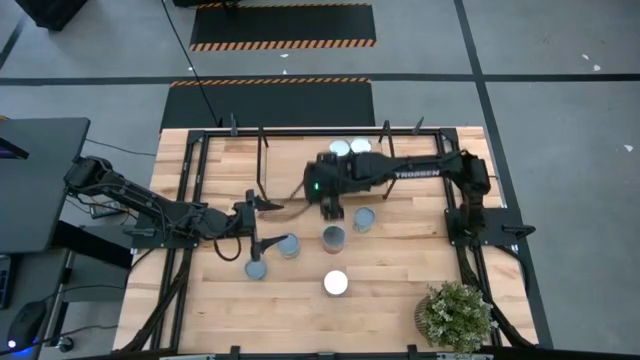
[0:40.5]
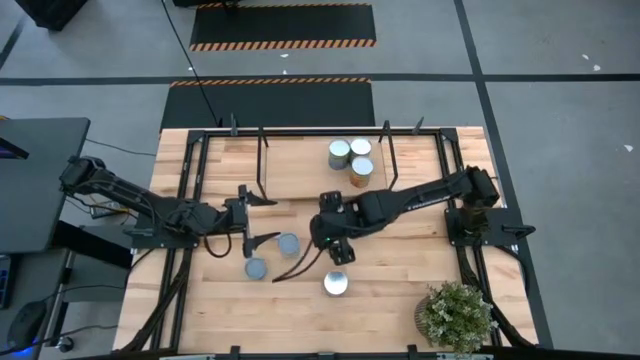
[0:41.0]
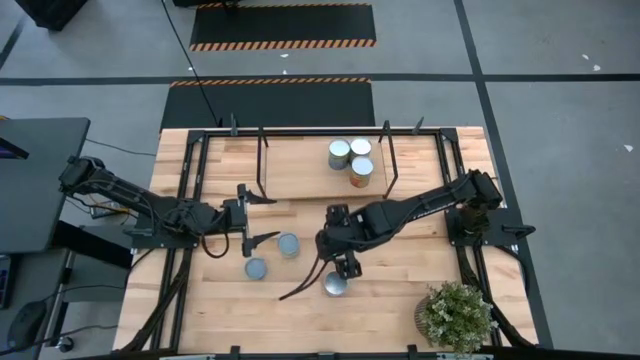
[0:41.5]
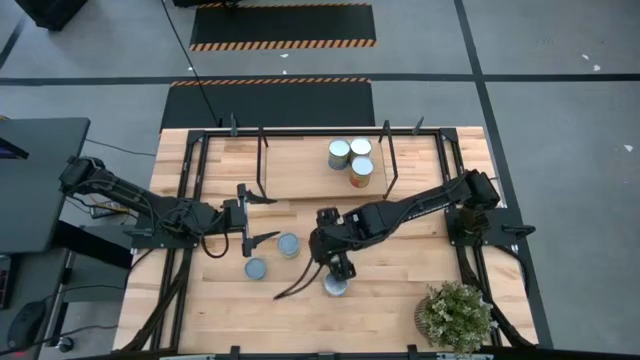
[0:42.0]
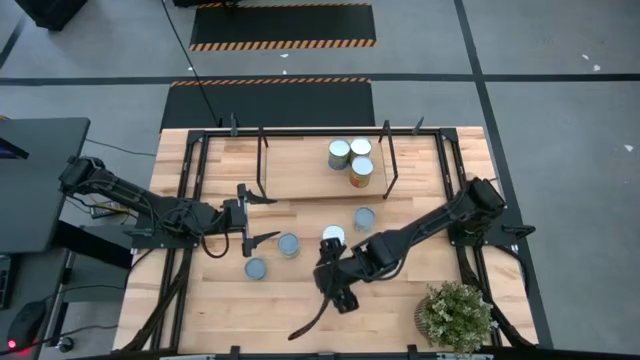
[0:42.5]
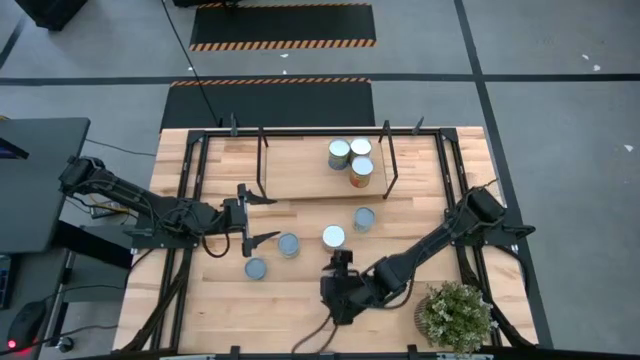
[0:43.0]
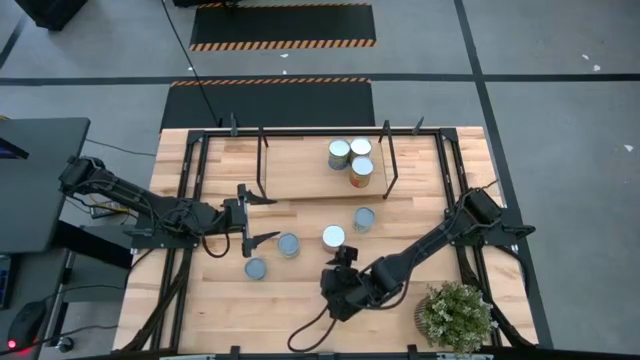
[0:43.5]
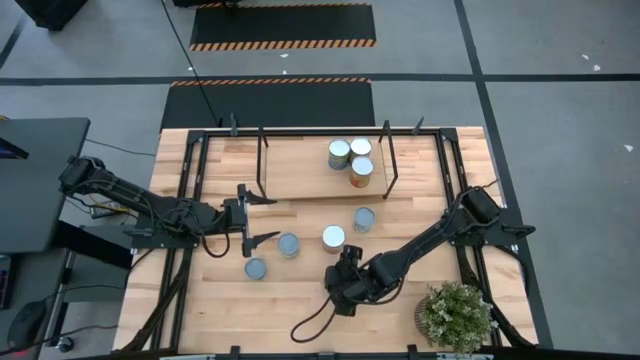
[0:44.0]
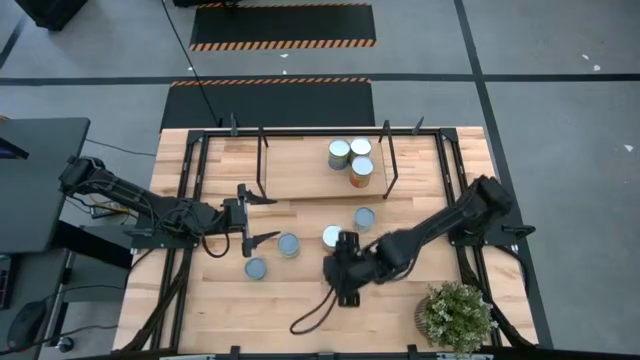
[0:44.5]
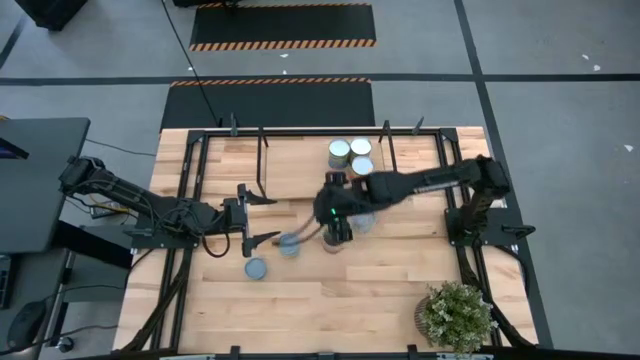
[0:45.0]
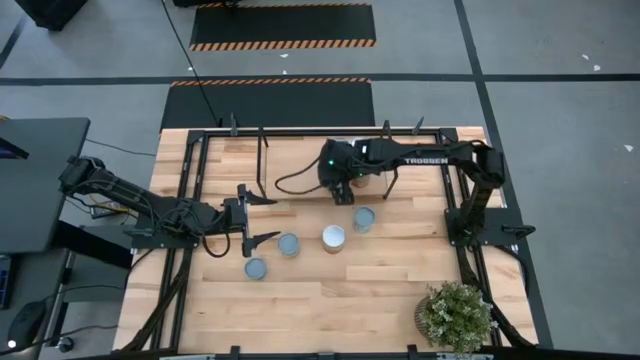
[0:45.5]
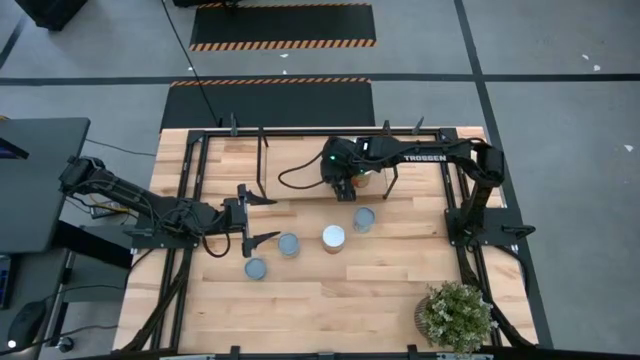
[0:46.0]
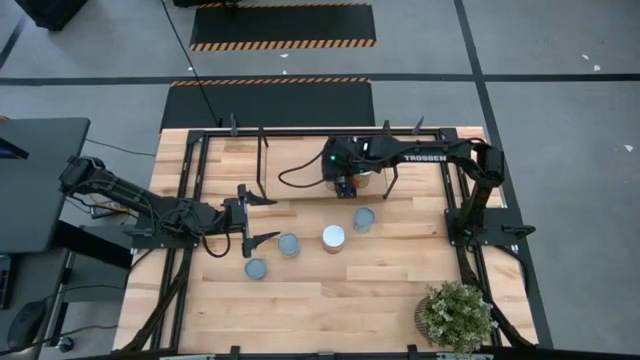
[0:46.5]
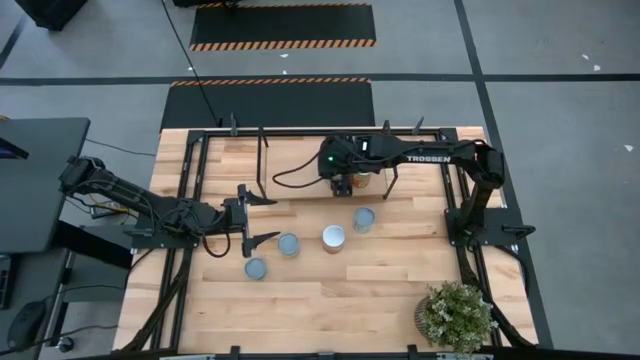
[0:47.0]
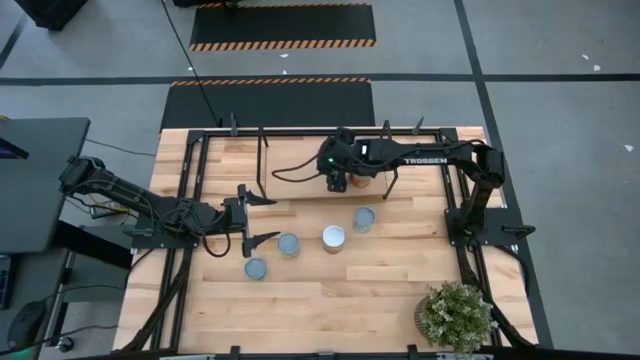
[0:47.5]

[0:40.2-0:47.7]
Task: Pick and place cans onto a shelf
Put the canned peaches on the shelf

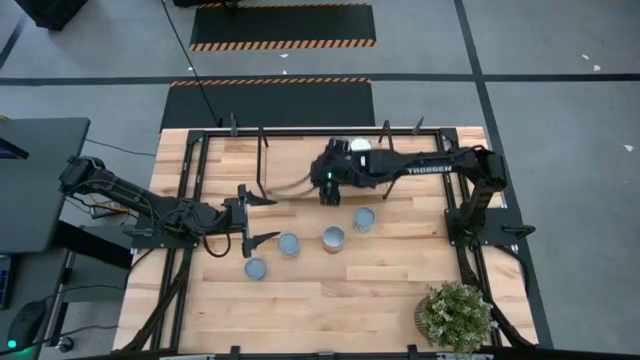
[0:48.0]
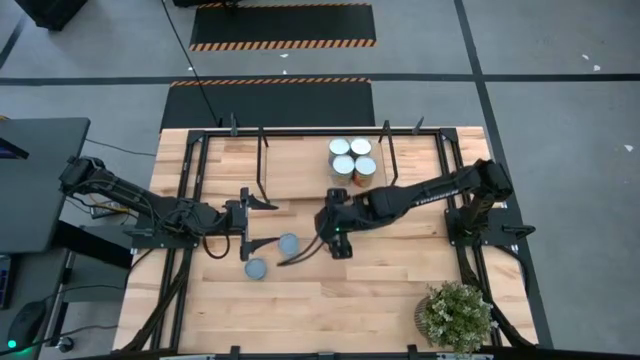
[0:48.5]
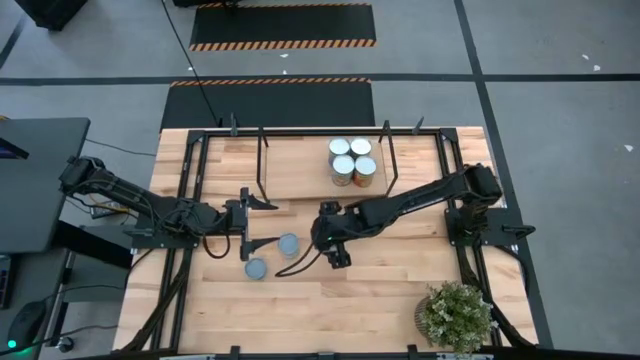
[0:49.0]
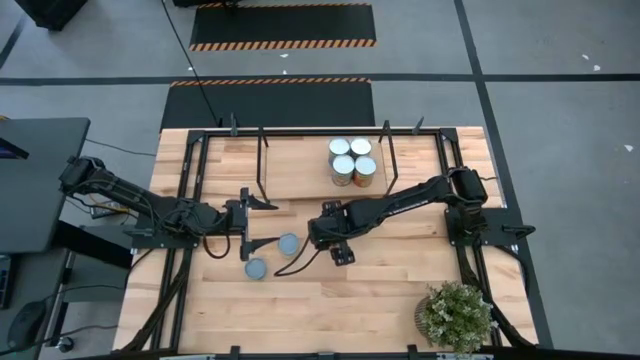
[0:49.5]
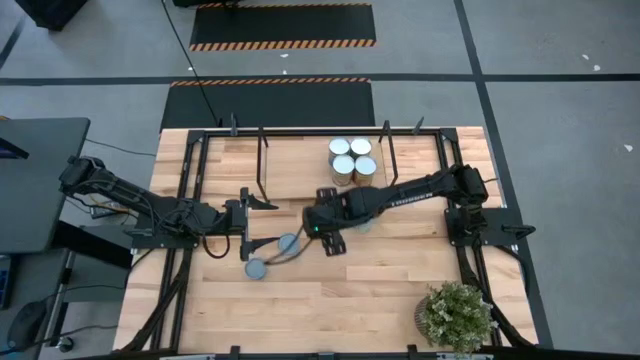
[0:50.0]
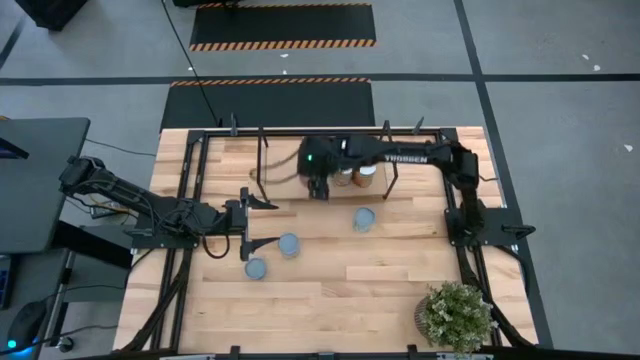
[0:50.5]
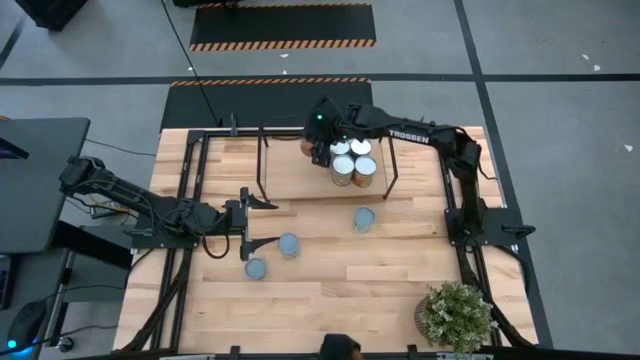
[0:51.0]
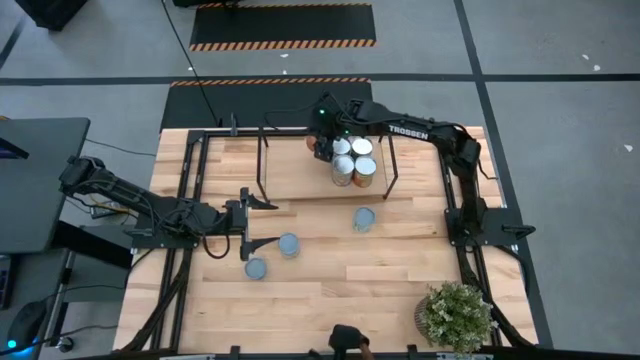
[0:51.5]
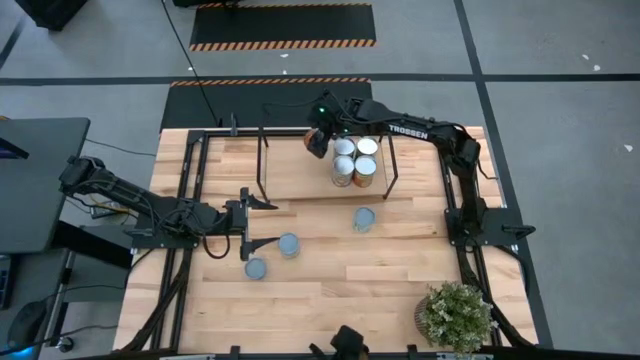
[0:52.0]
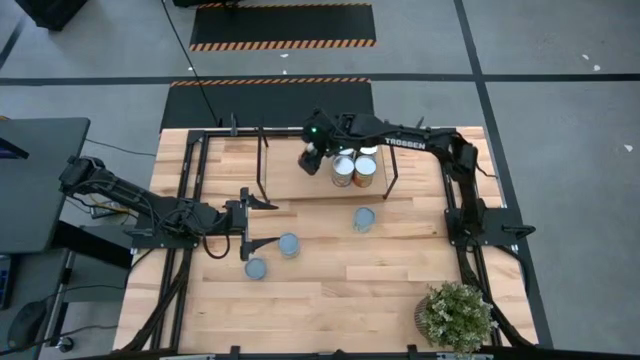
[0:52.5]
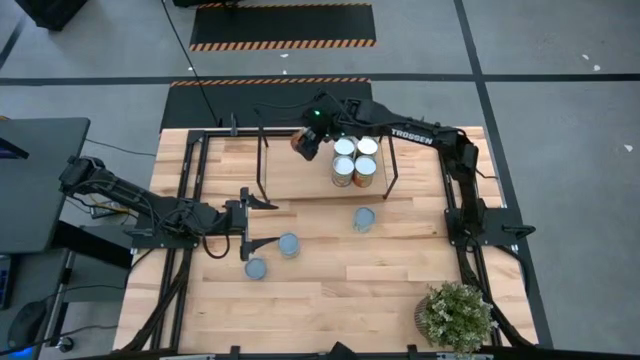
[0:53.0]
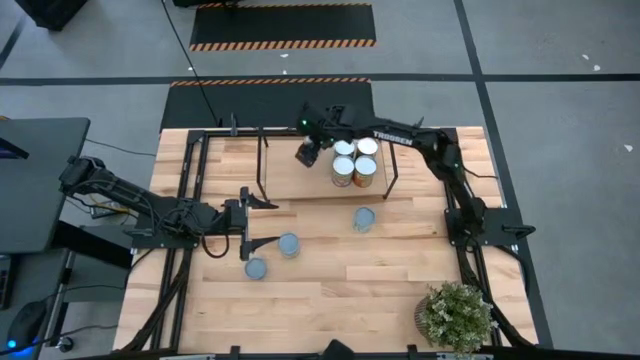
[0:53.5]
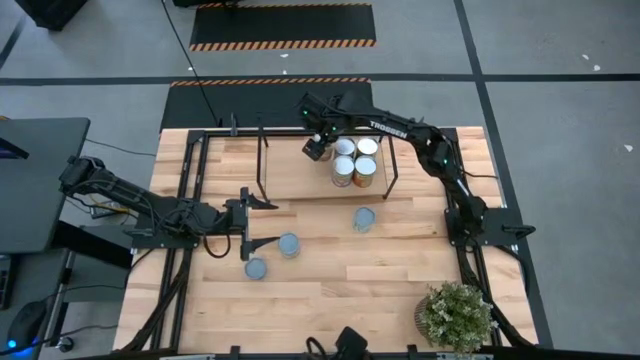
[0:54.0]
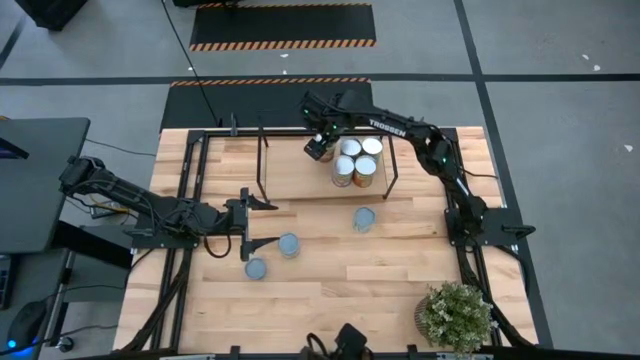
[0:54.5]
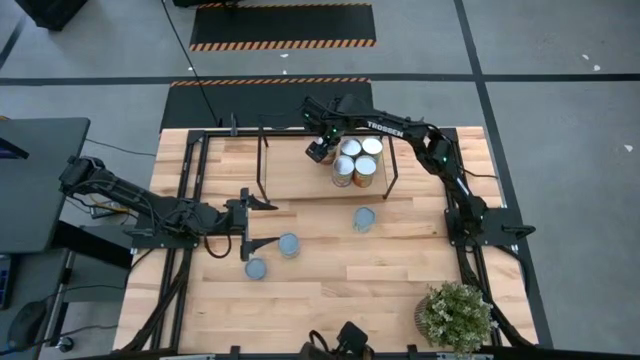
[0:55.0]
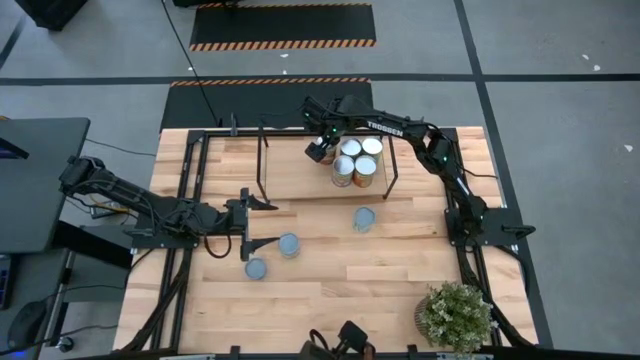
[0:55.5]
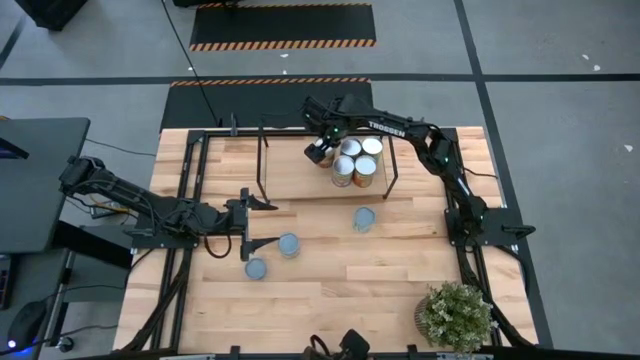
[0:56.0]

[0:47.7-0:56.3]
Put the canned corn on the shelf

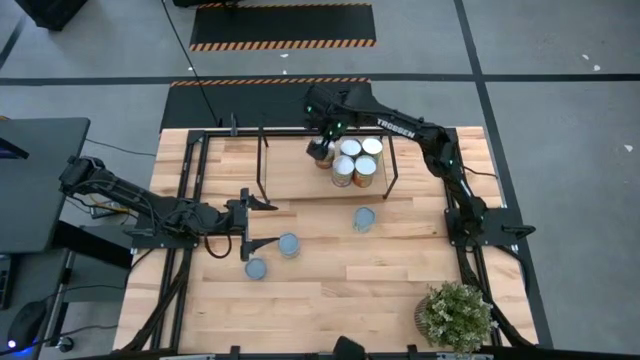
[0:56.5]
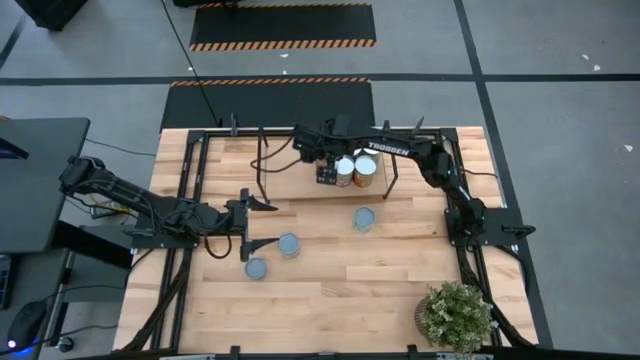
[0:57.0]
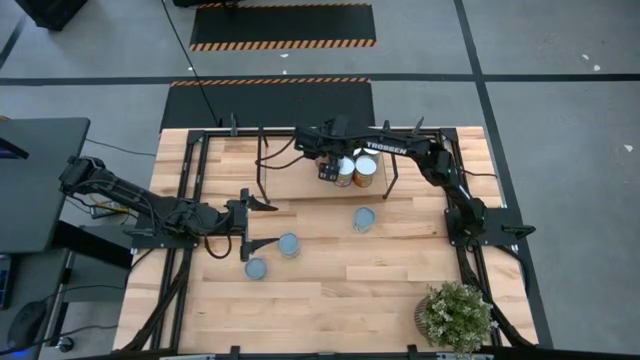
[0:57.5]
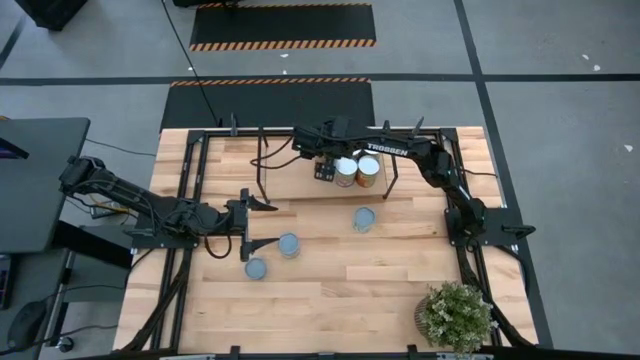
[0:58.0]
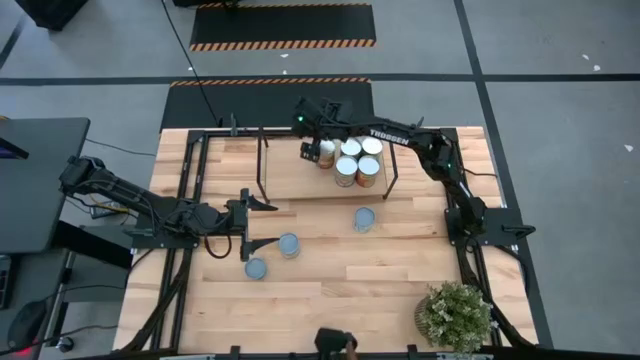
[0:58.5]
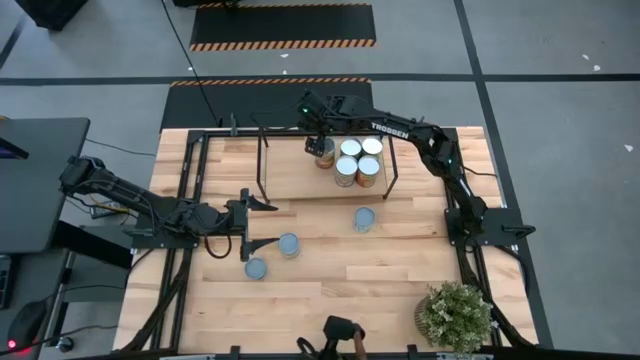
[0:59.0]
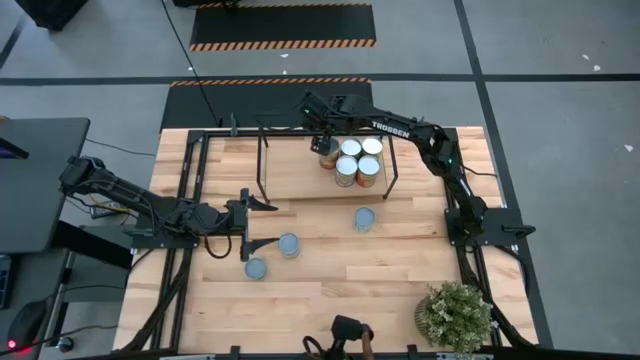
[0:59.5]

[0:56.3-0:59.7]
Adjust the canned goods on the shelf
